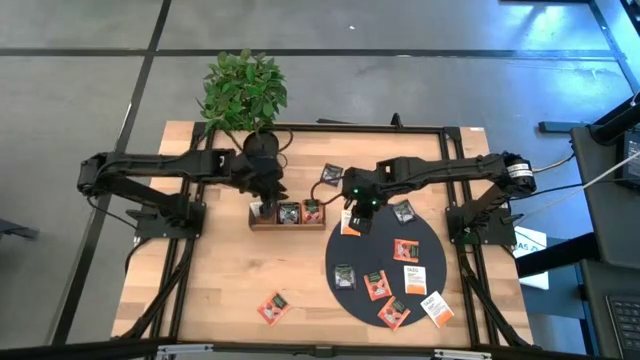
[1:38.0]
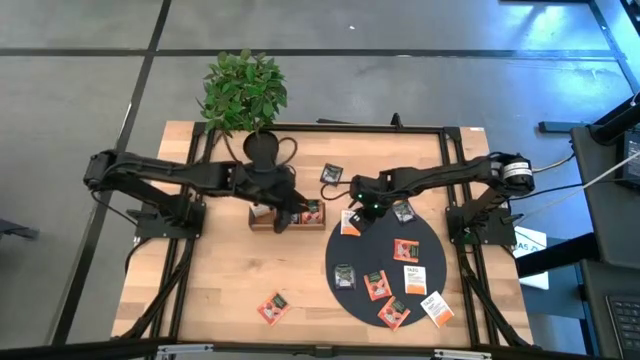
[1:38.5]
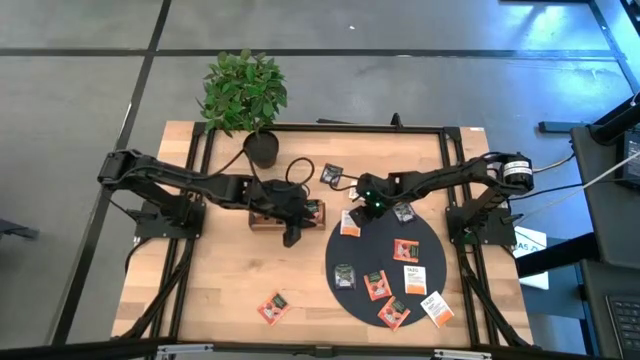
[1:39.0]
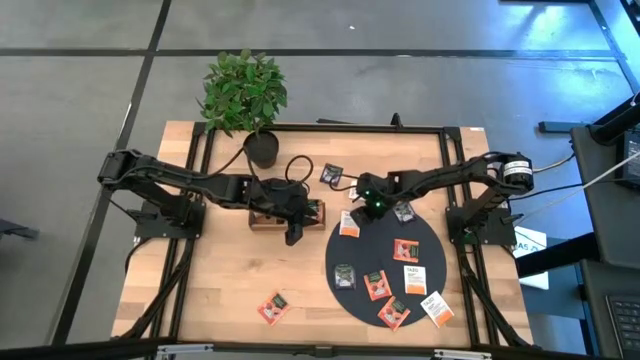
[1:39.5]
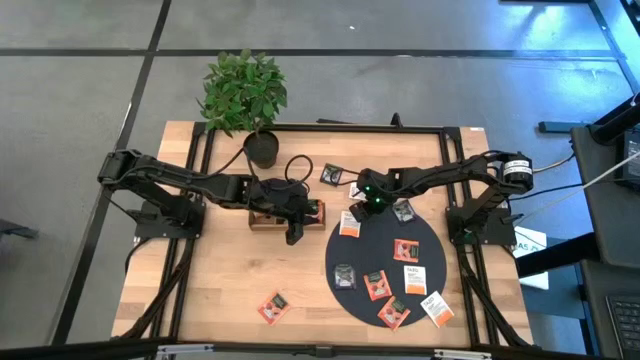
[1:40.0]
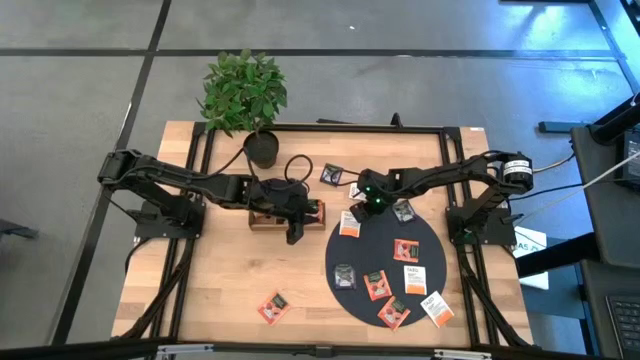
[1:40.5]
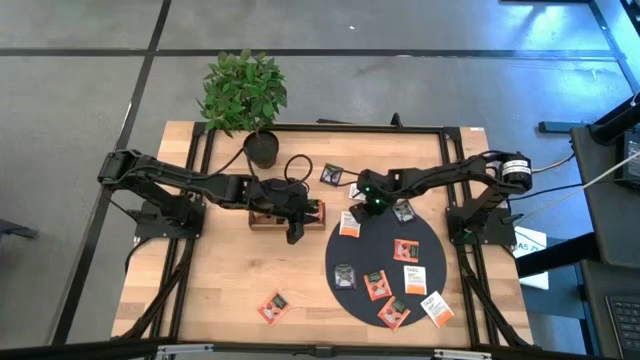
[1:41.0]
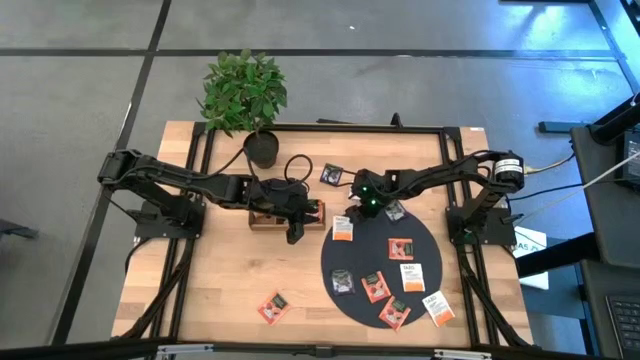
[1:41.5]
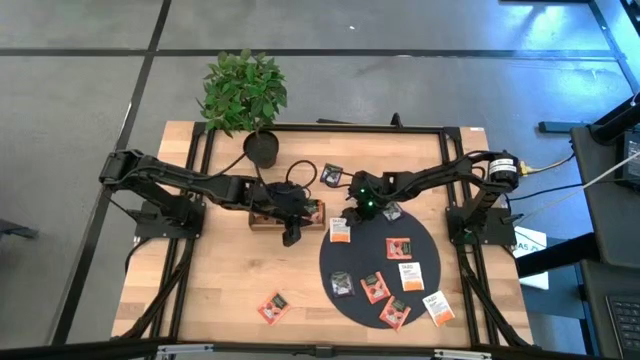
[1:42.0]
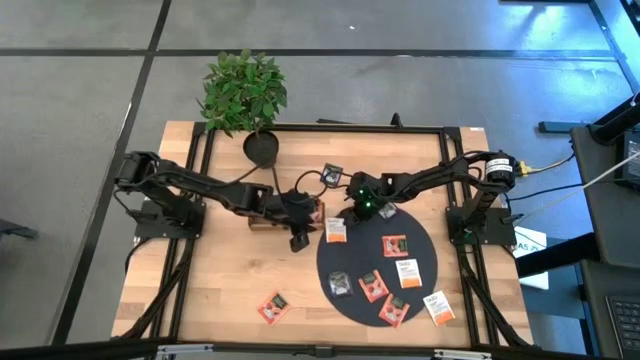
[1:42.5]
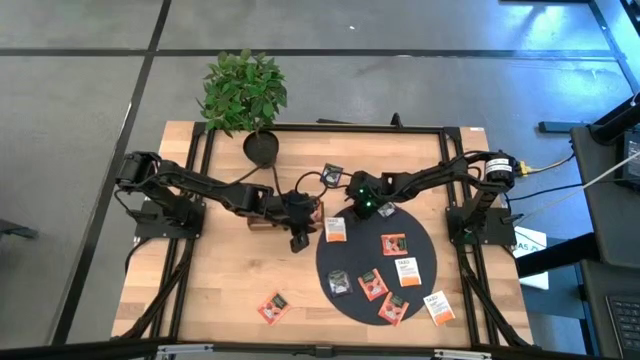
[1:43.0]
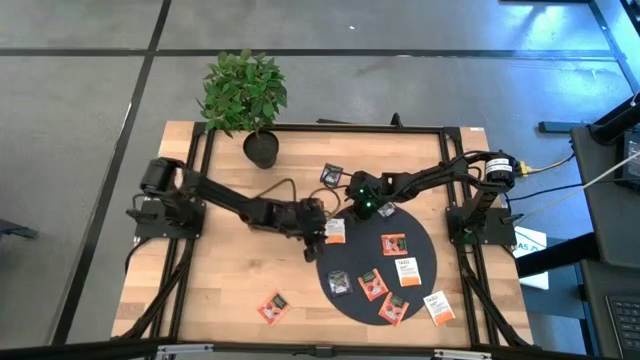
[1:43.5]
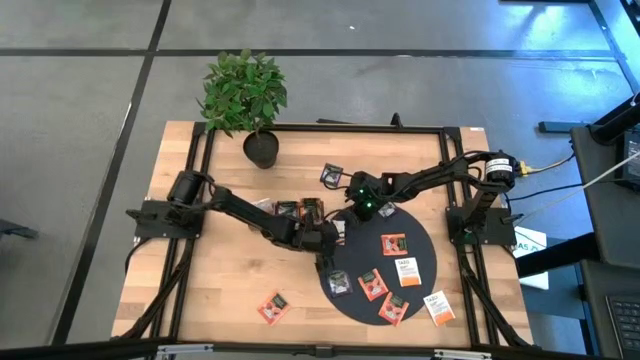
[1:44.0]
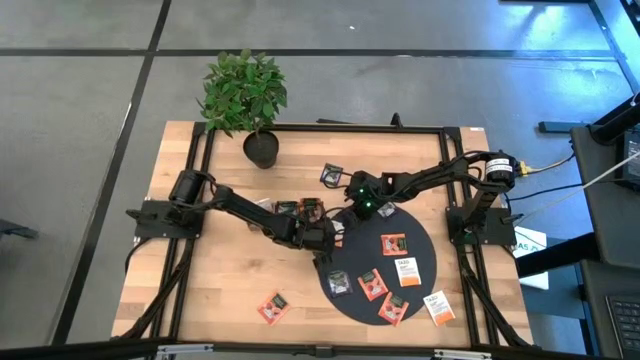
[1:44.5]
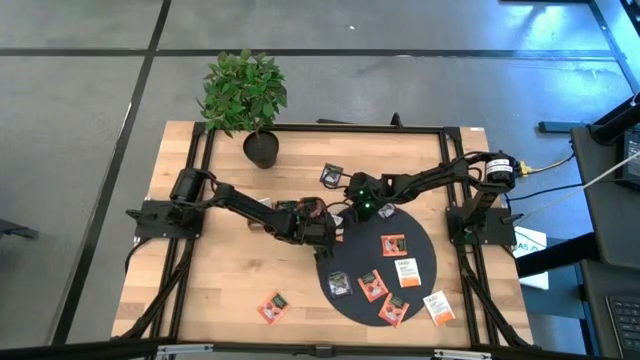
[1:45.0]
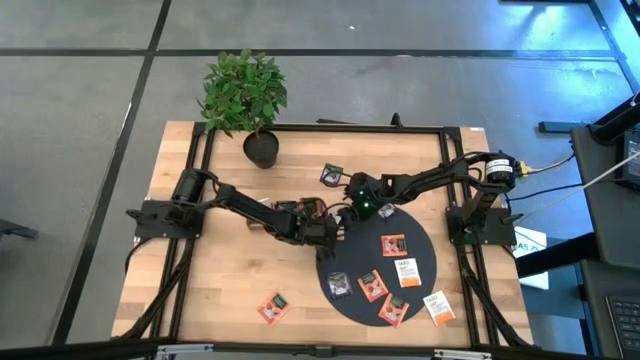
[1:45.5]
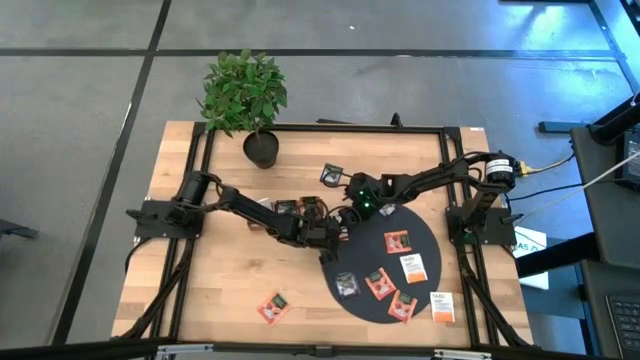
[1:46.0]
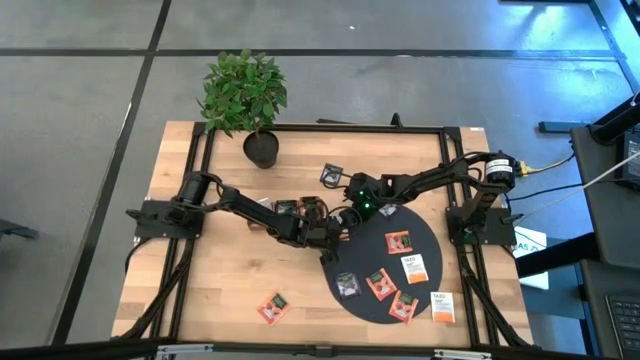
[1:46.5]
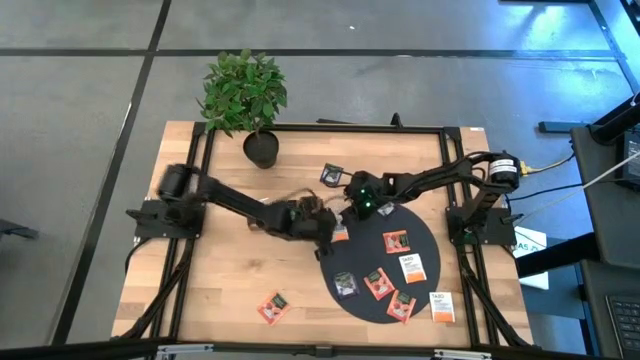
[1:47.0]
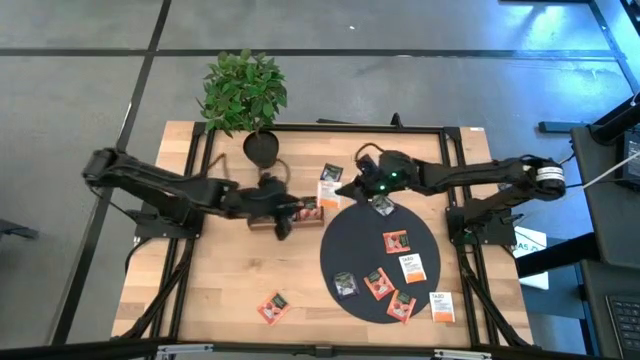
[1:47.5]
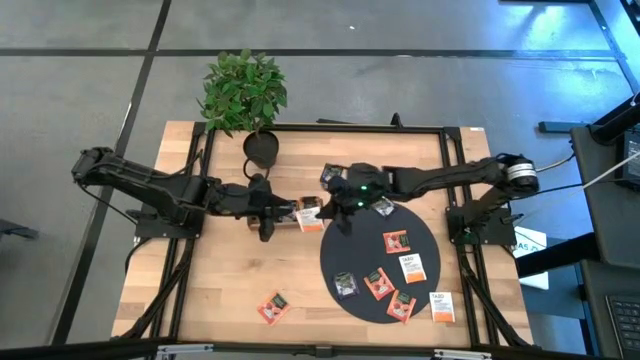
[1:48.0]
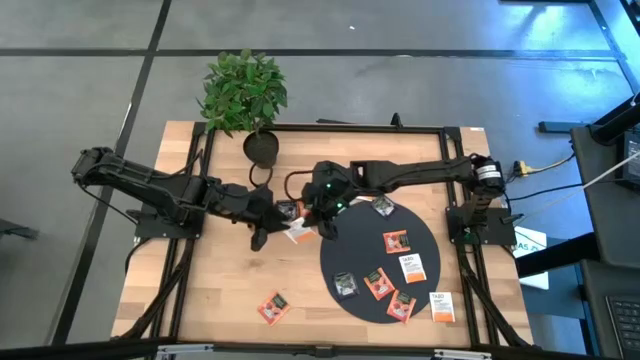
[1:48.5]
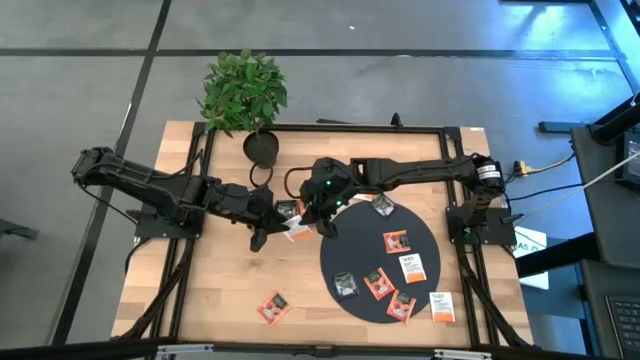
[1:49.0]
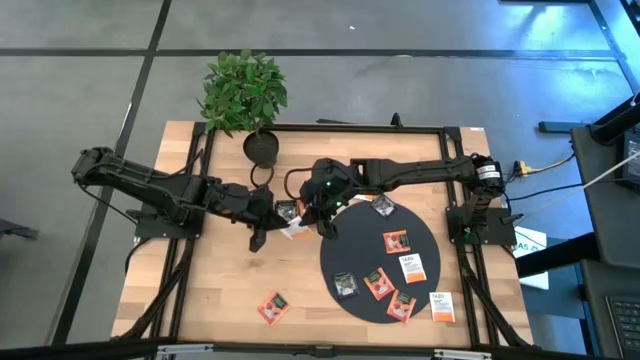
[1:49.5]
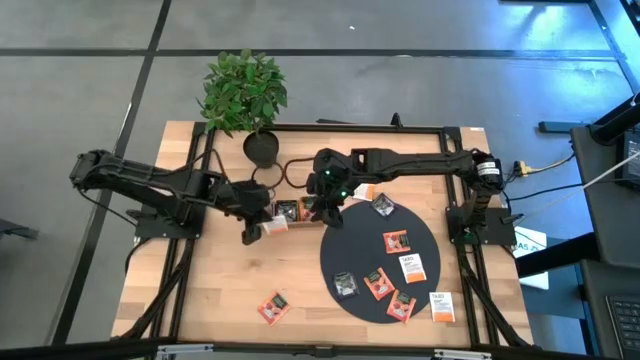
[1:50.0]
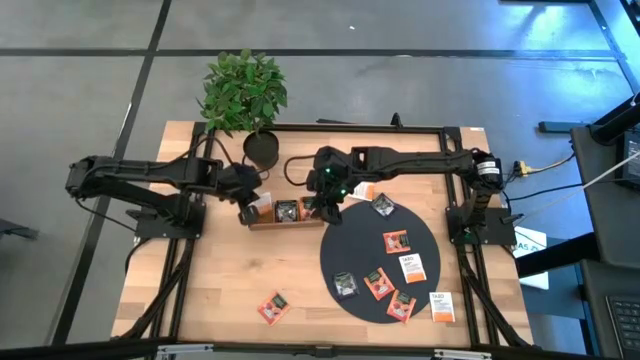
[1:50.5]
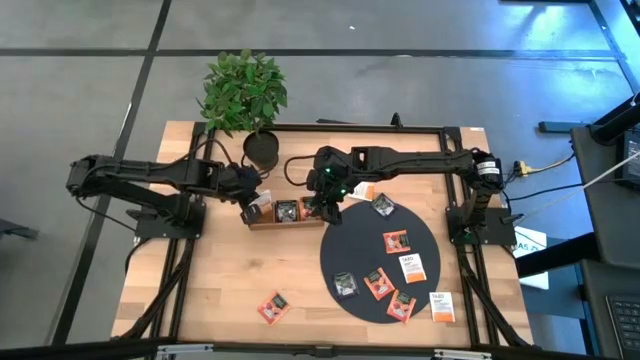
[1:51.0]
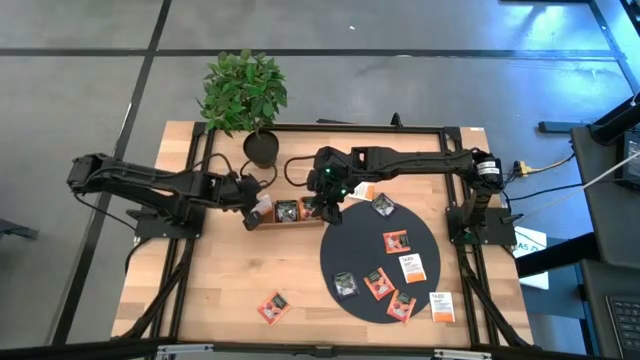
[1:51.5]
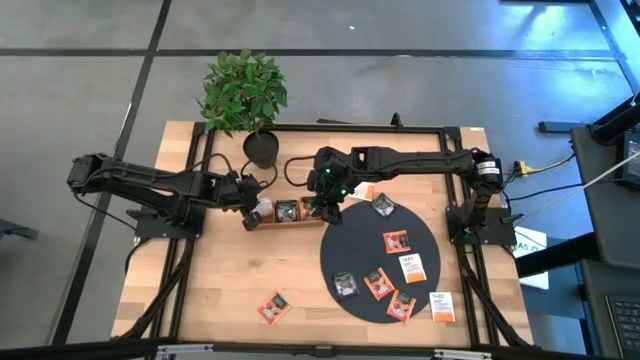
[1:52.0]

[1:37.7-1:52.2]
Task: Pick & Place Tea
Put the white tea bag into the left section of the wooden organizer

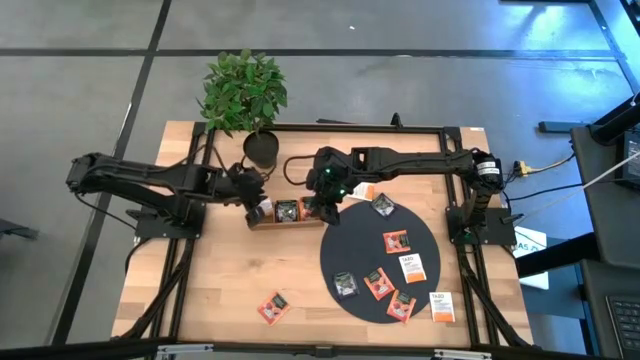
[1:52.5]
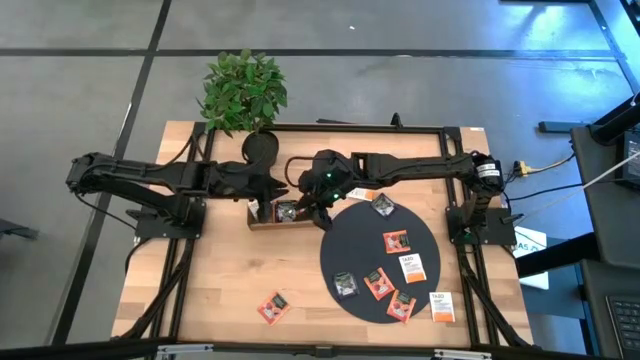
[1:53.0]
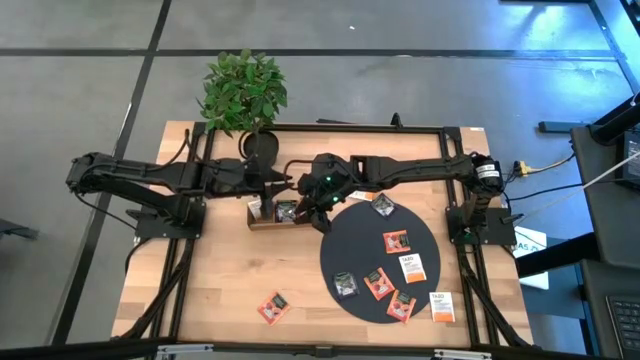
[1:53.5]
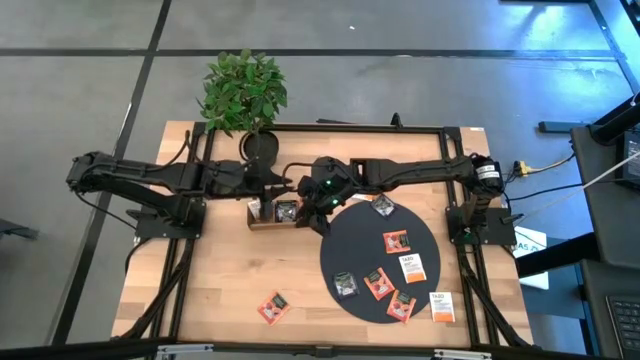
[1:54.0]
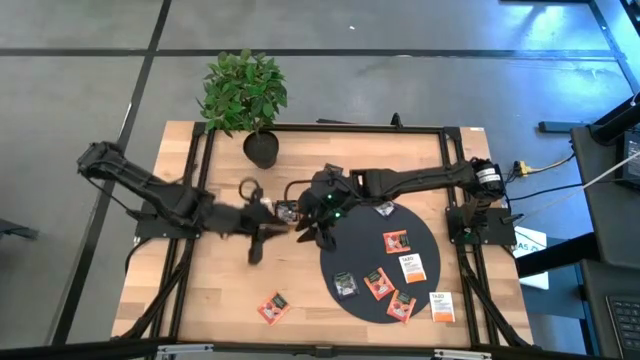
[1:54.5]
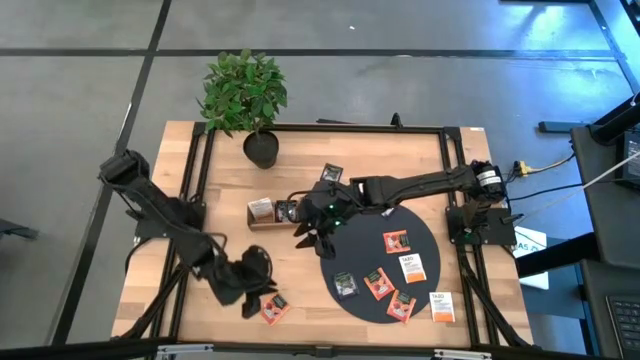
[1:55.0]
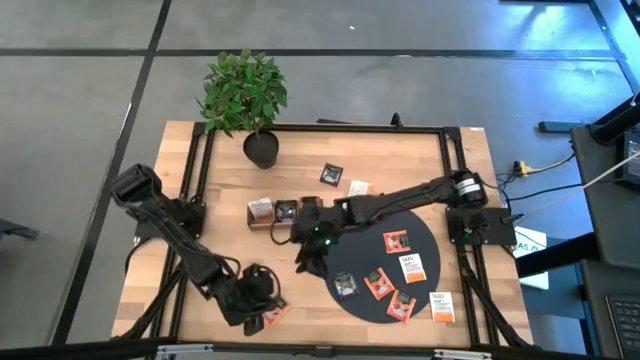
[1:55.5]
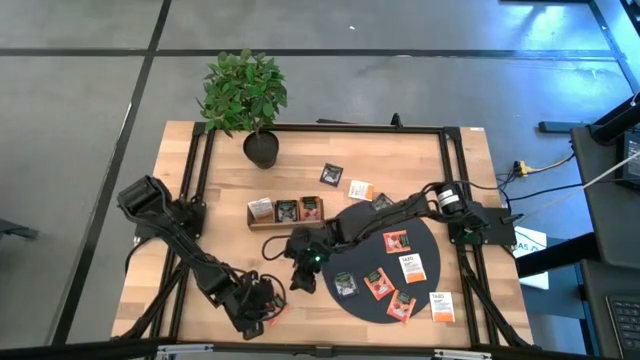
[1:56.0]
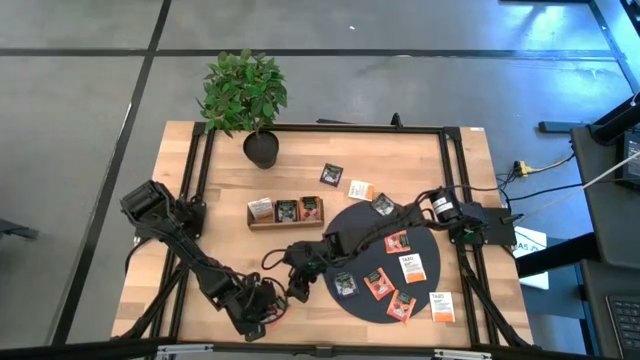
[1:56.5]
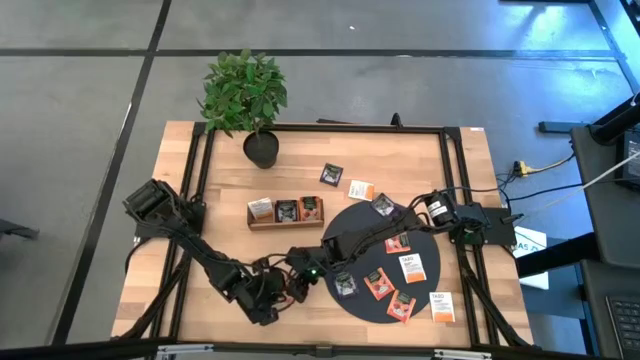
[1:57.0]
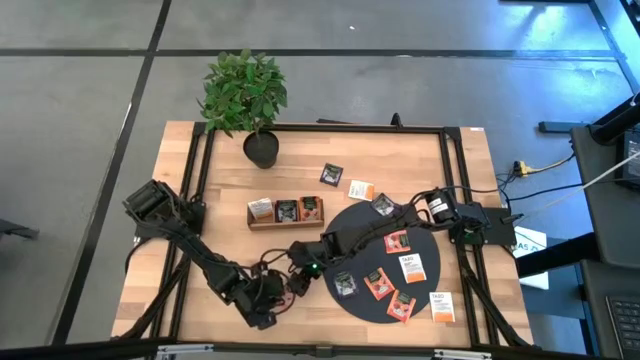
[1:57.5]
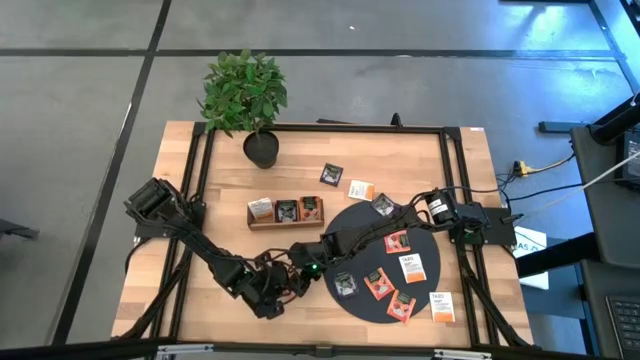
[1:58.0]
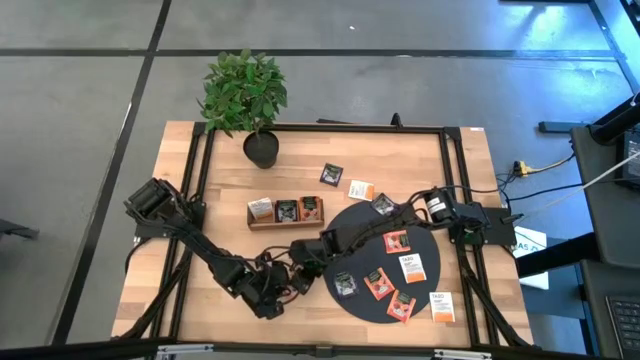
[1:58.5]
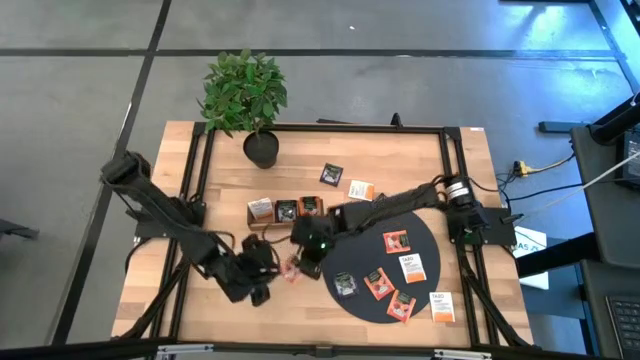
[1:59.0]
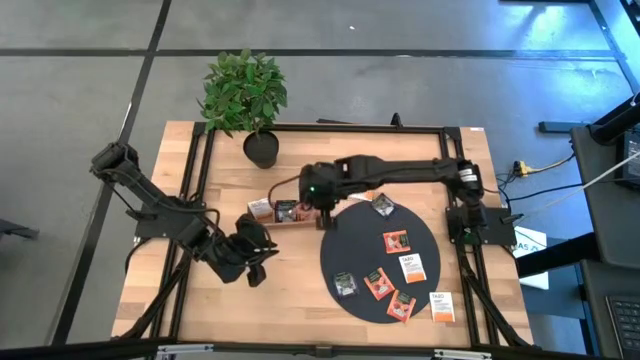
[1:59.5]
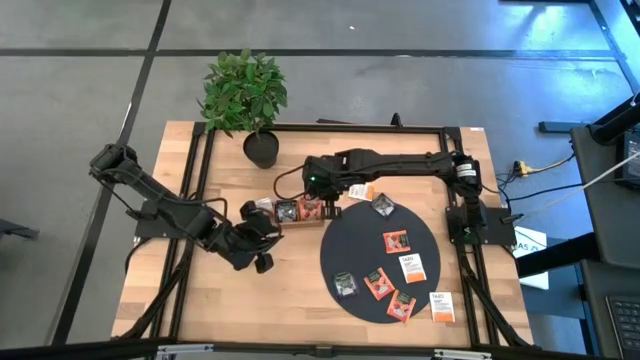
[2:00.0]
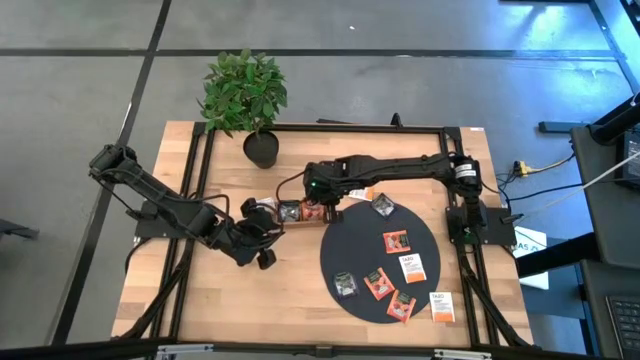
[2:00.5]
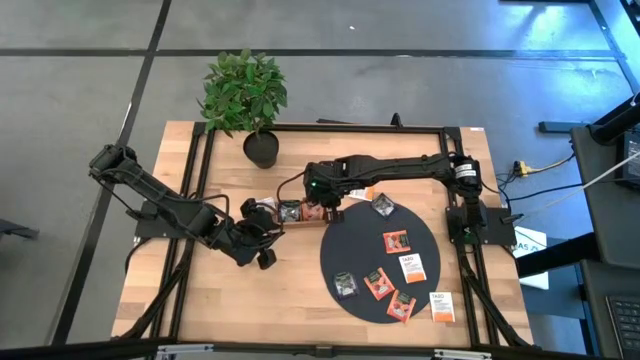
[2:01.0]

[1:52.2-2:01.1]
Put the orange tea bag into the right section of the wooden organizer
